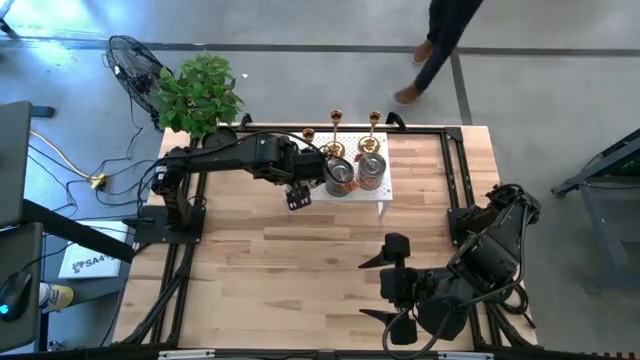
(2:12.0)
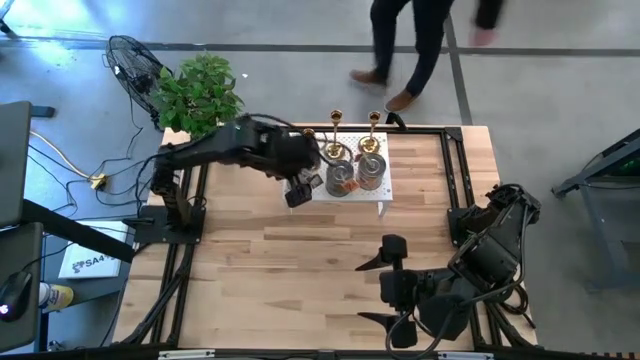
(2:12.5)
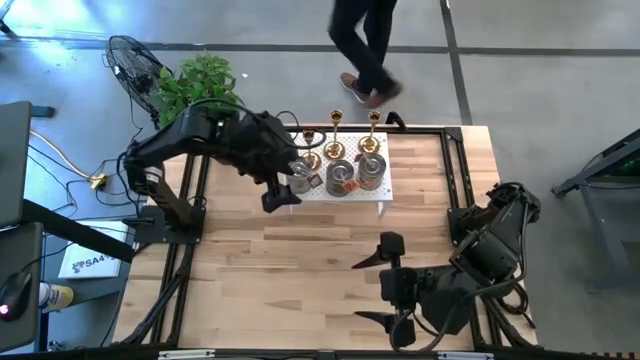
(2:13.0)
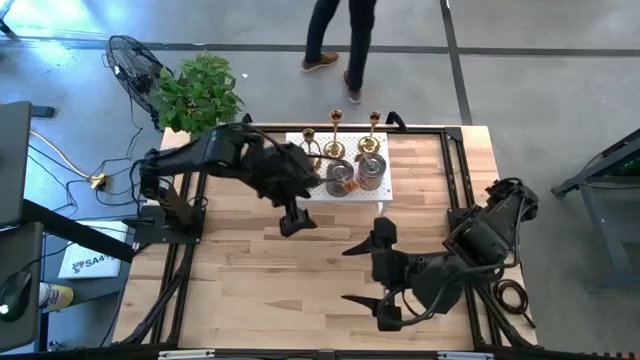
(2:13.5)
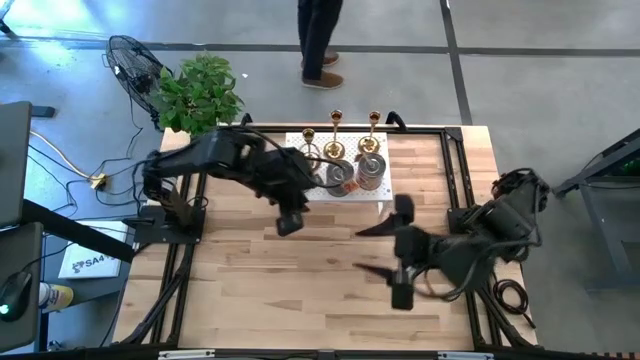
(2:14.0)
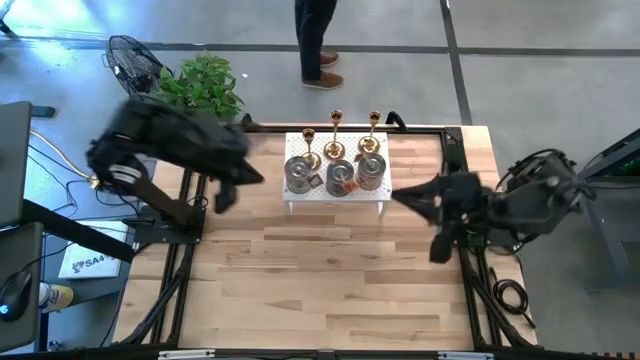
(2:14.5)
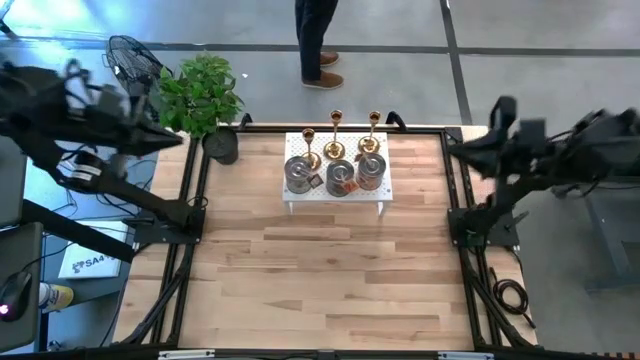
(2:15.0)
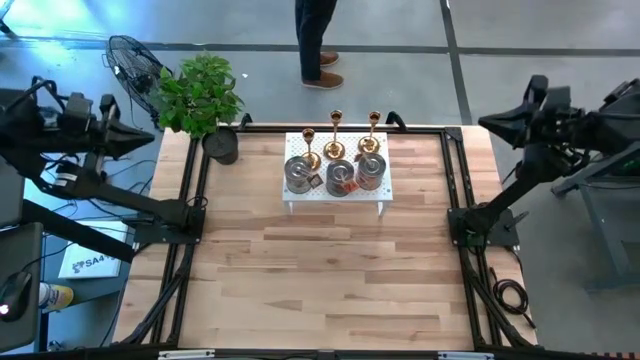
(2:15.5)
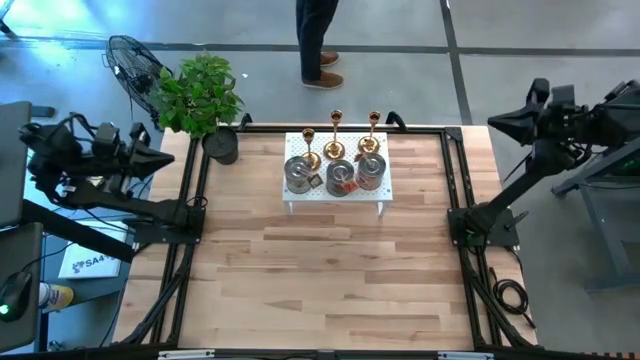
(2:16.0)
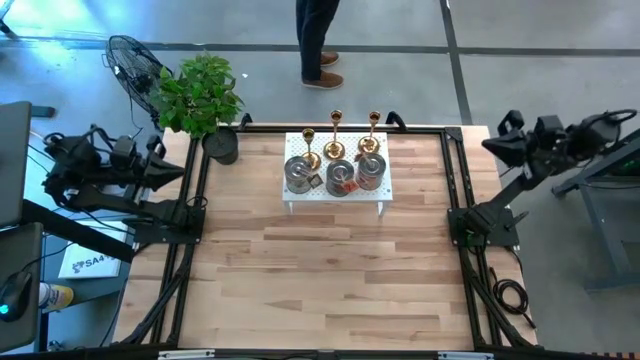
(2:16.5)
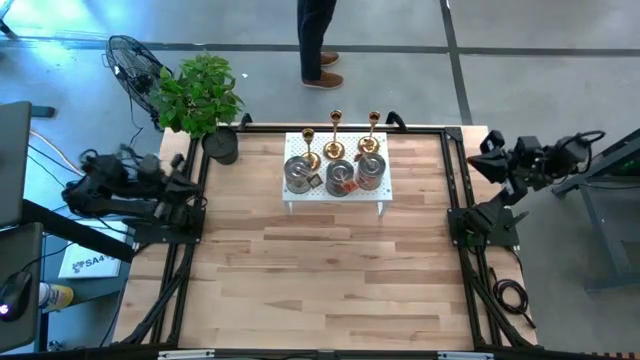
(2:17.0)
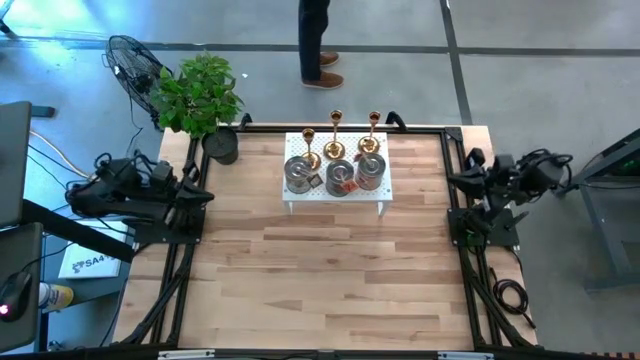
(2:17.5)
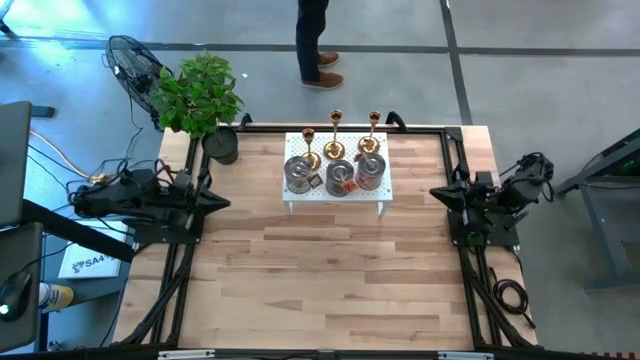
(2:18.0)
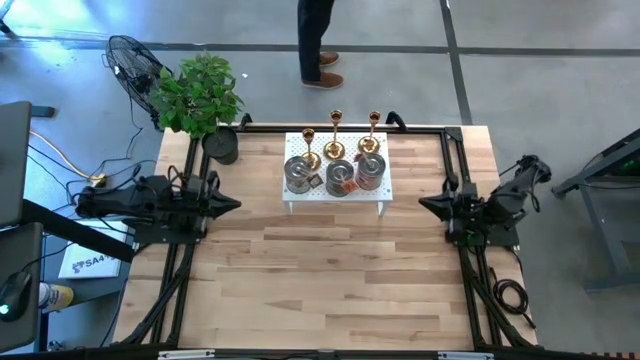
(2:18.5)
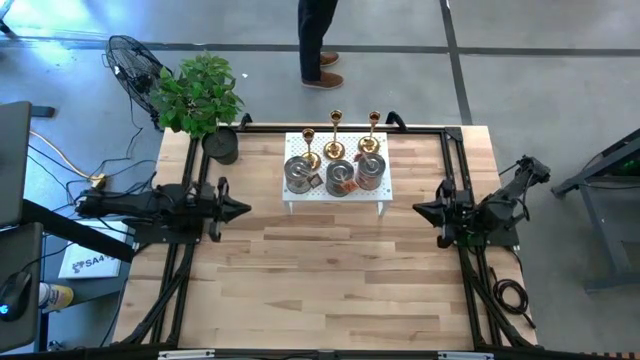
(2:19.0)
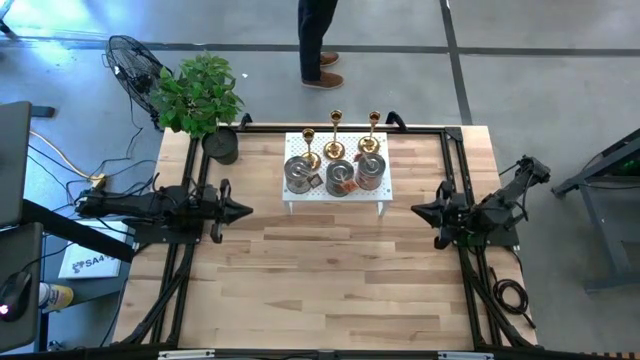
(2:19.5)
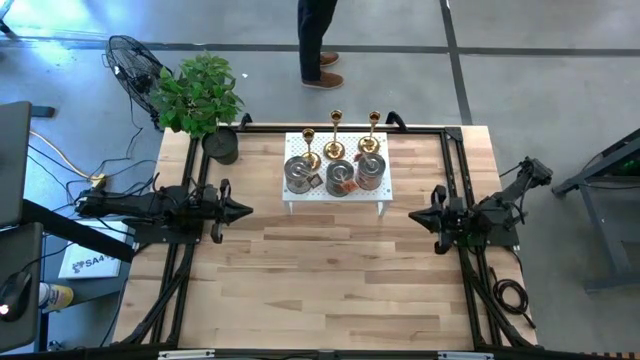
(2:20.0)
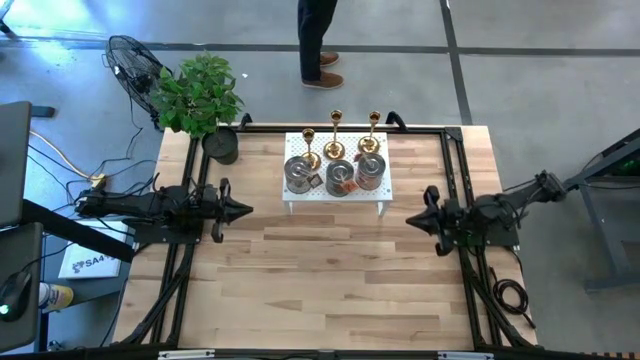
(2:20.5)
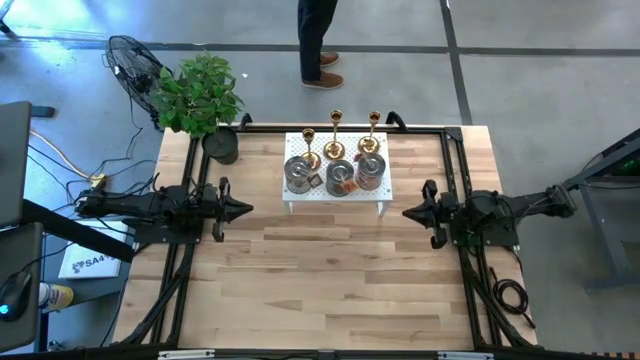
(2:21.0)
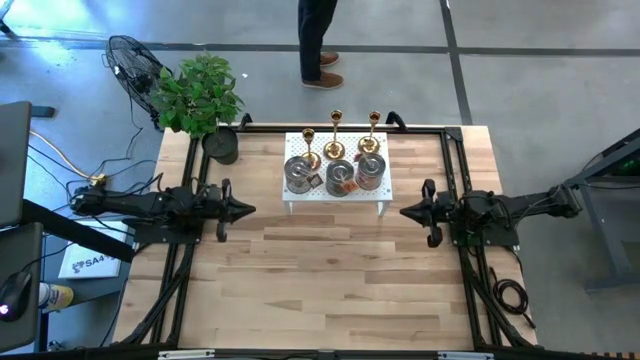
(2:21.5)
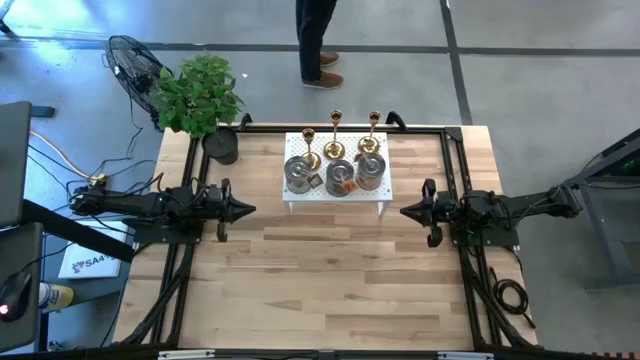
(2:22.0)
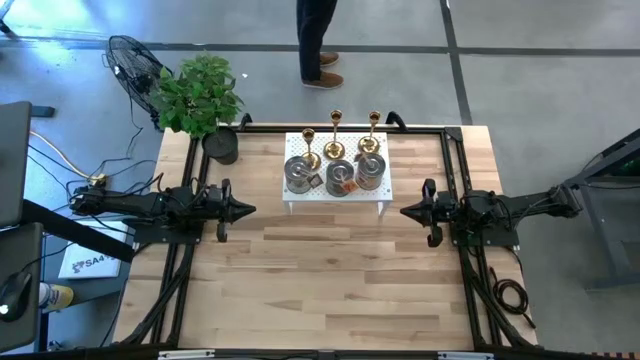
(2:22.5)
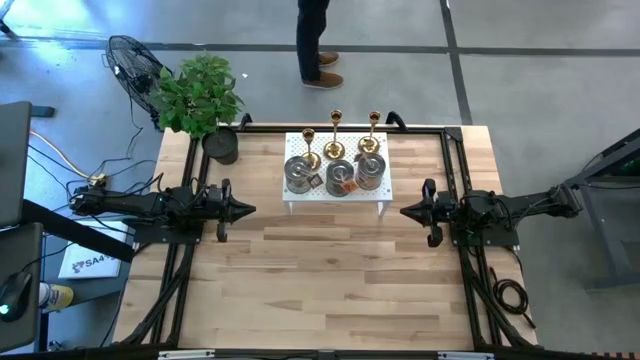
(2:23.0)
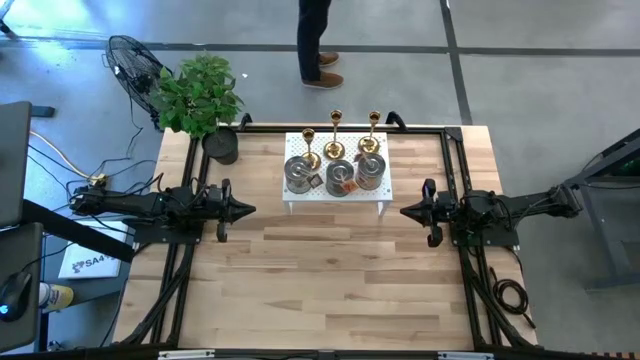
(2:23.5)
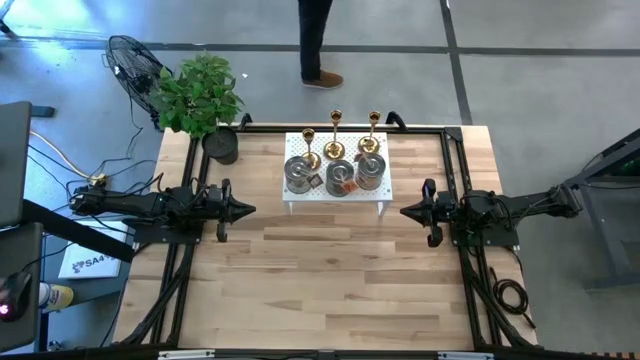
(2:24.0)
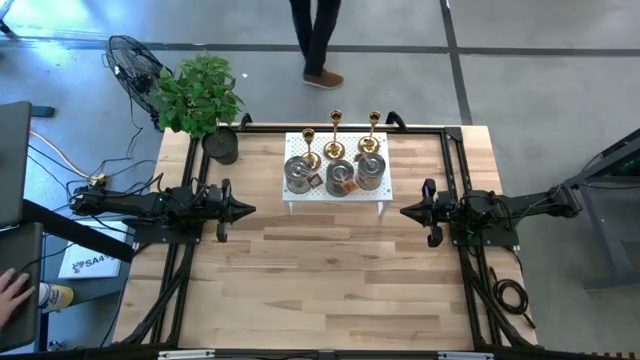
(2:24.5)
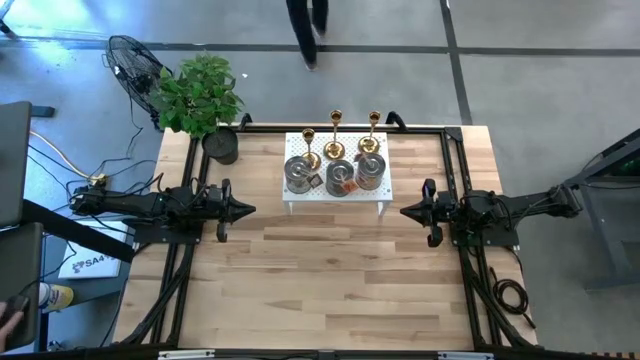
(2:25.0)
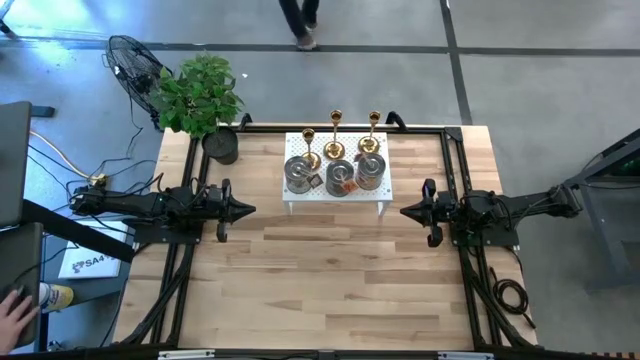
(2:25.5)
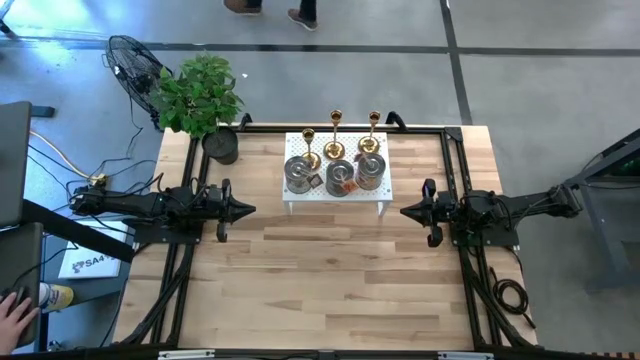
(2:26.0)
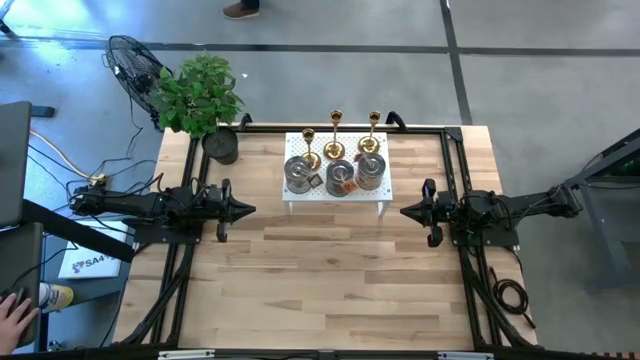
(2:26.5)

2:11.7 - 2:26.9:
Task: Pick & Place candle stick holders
Return to Home Position

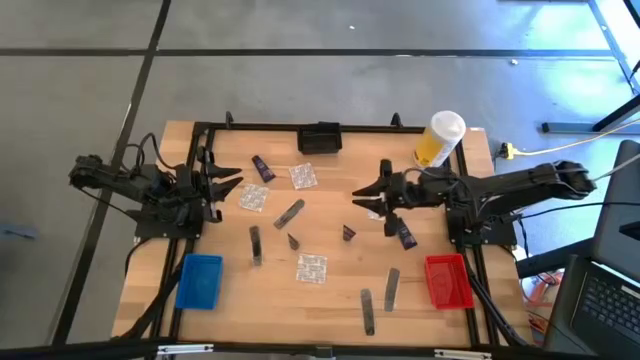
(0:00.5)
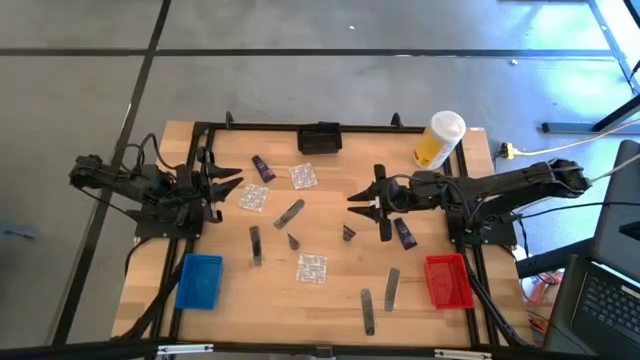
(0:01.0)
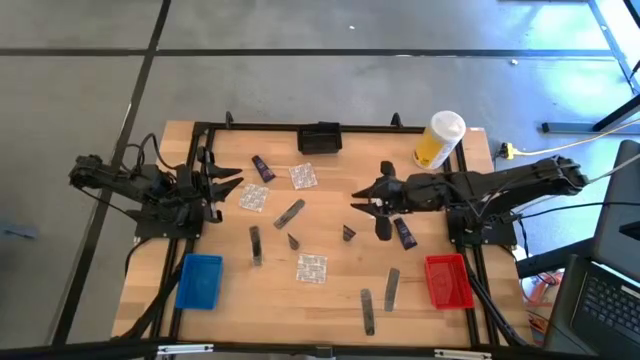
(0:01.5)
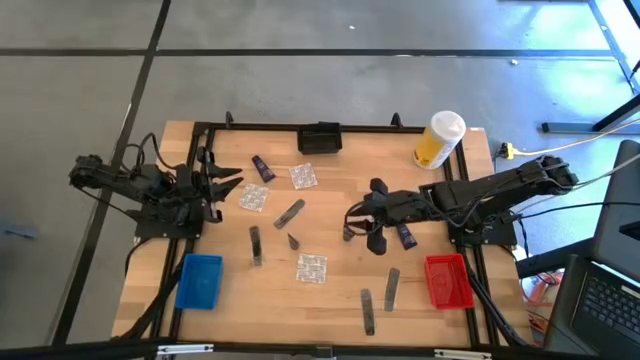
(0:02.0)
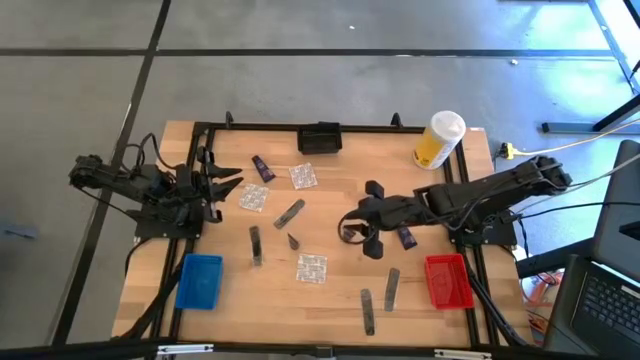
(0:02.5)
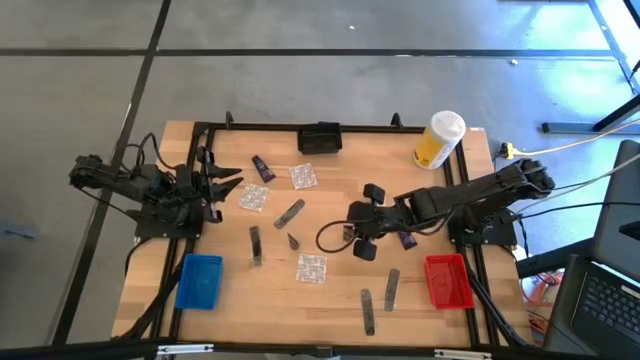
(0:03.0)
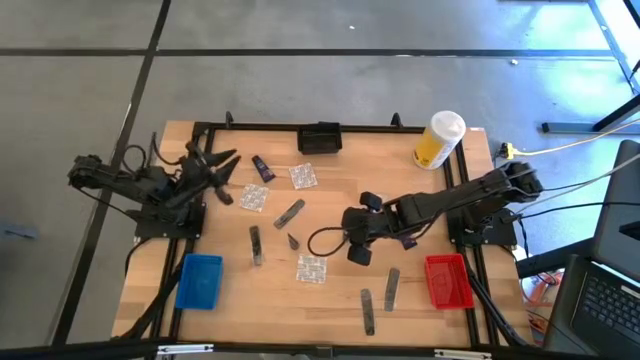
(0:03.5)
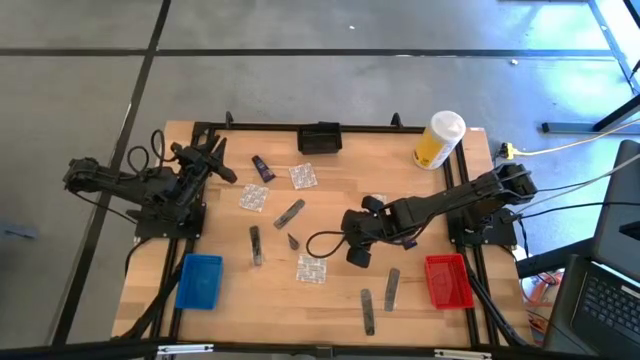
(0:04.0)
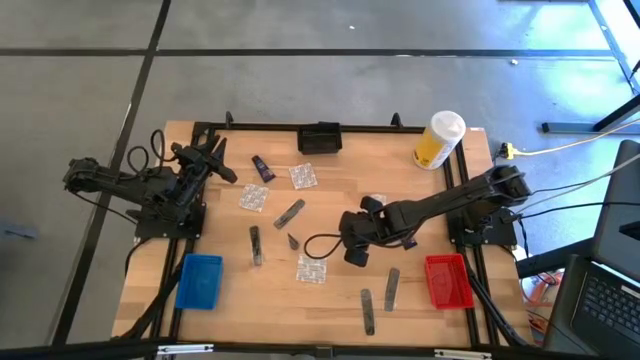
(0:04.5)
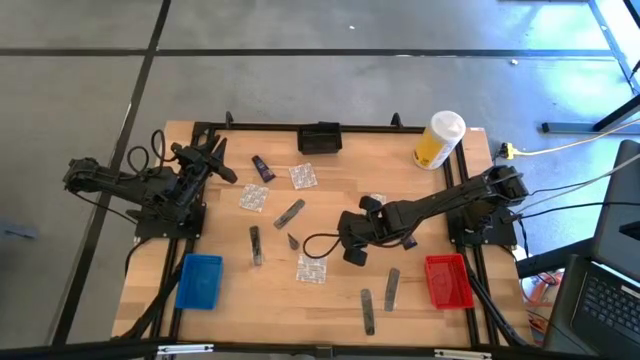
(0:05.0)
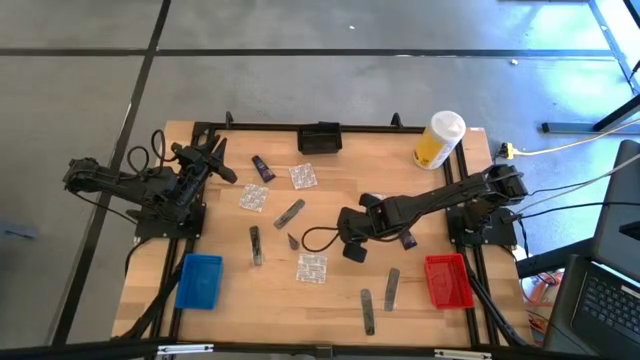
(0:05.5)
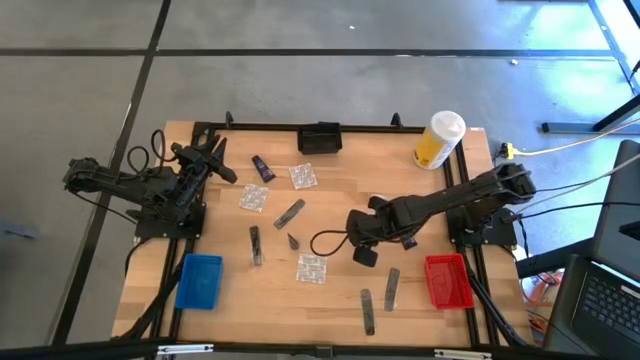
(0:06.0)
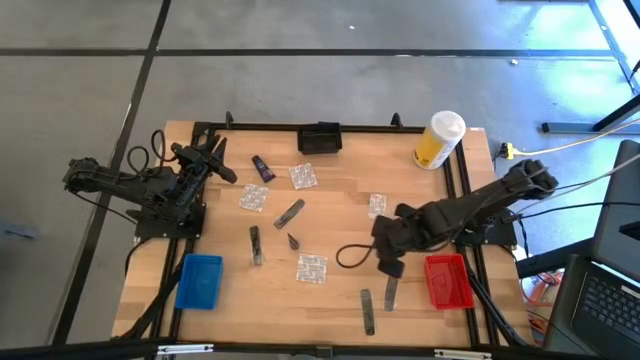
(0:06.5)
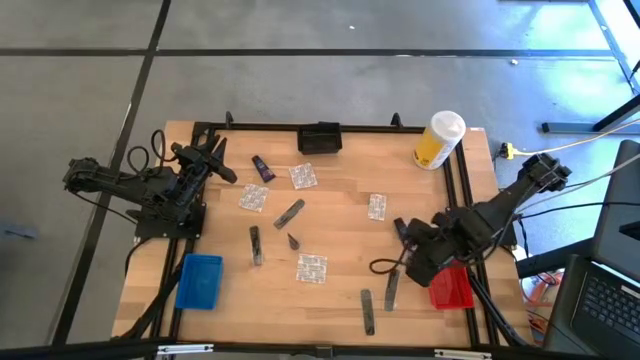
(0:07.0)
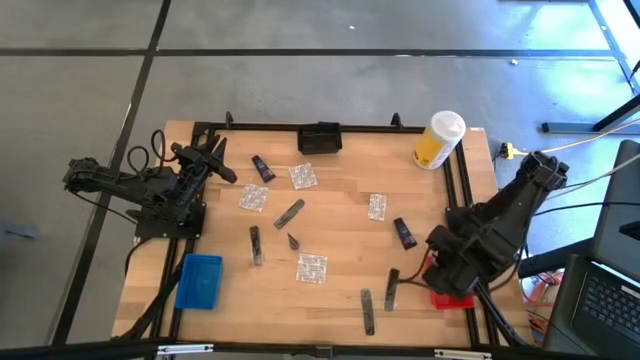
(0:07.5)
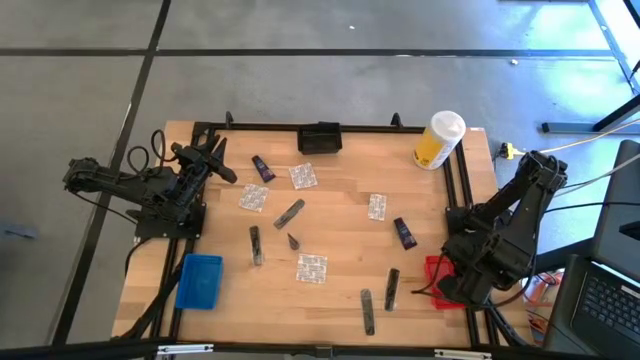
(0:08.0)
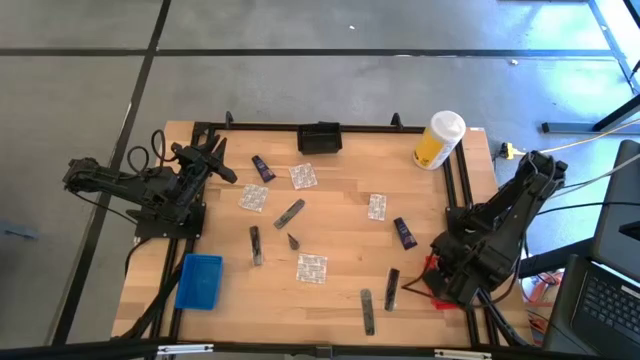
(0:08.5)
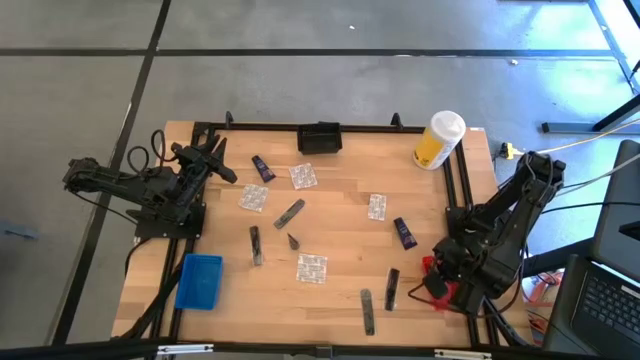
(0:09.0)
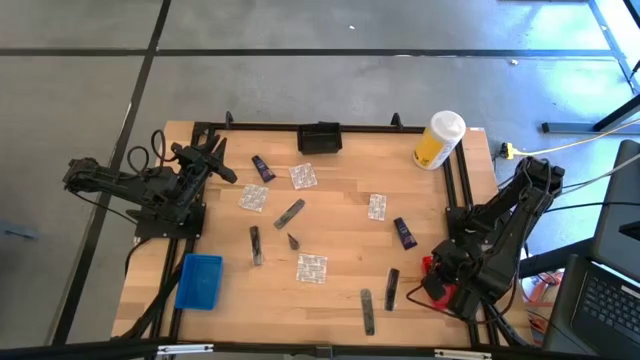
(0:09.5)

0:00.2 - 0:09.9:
Task: Pick & Place Travel size toiletries
Put the blue shave butter into the red bin
